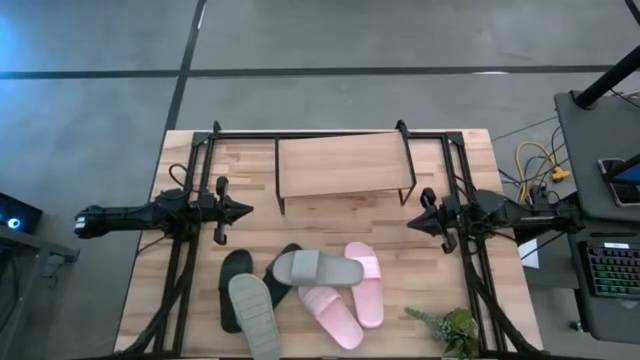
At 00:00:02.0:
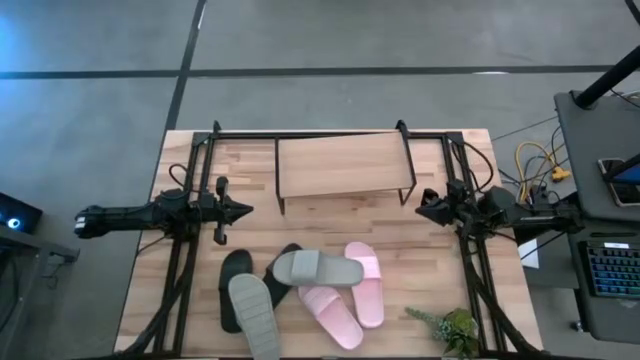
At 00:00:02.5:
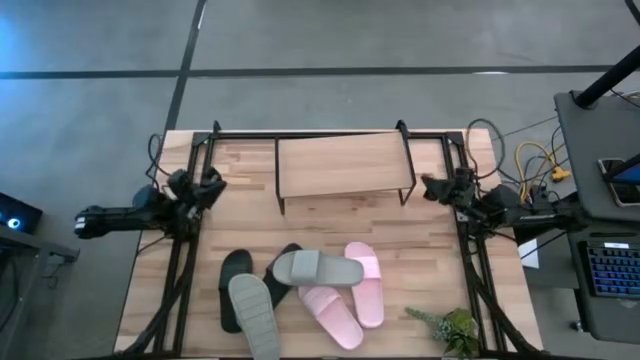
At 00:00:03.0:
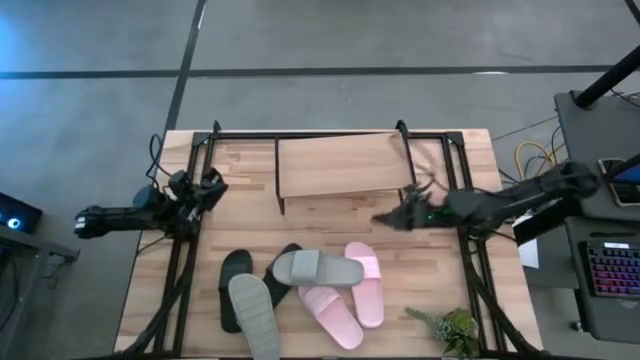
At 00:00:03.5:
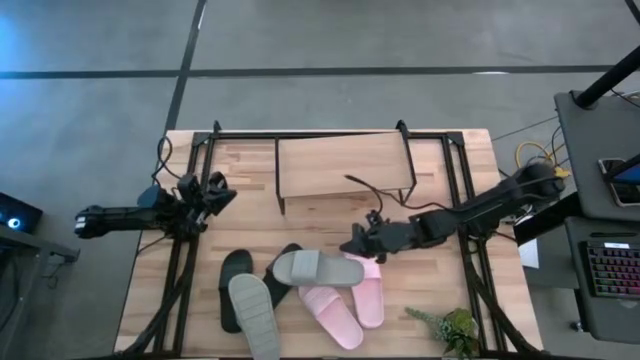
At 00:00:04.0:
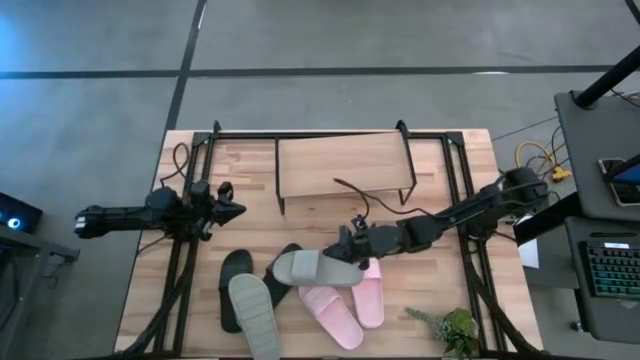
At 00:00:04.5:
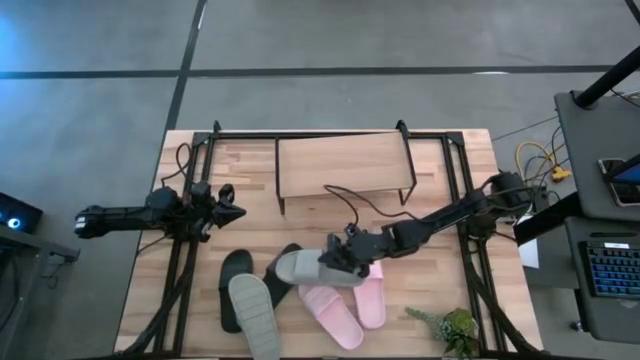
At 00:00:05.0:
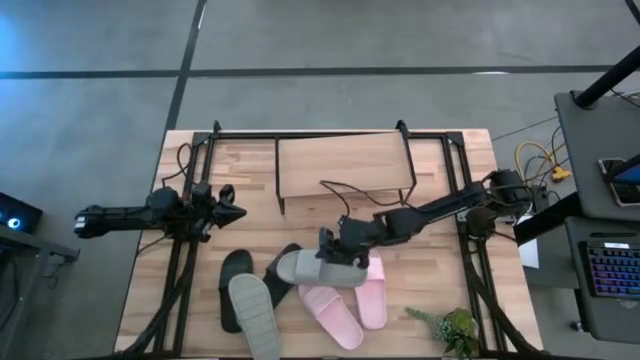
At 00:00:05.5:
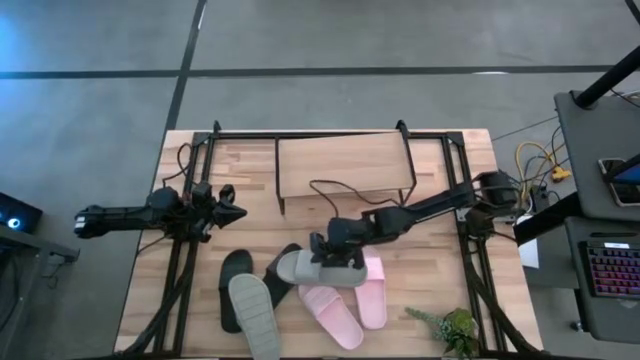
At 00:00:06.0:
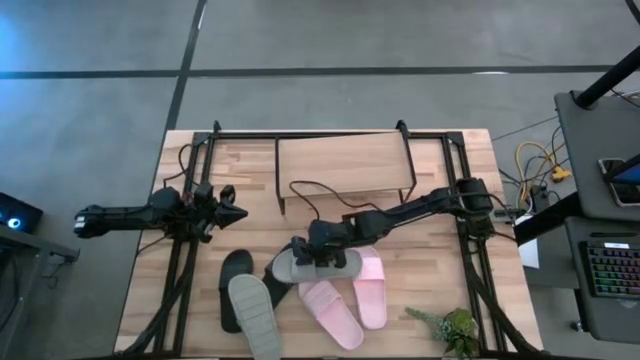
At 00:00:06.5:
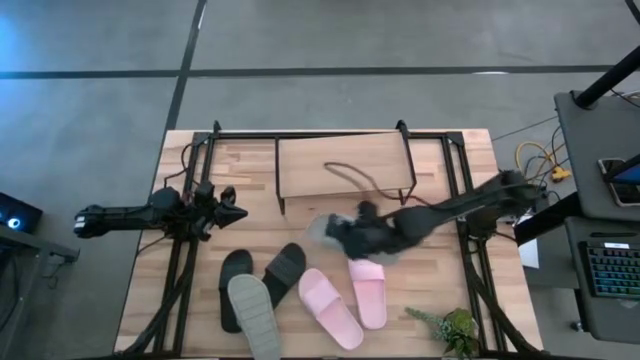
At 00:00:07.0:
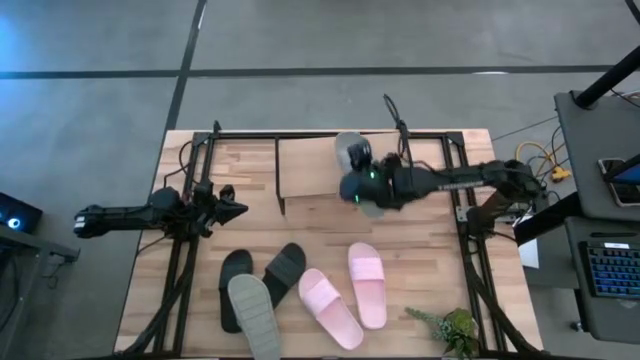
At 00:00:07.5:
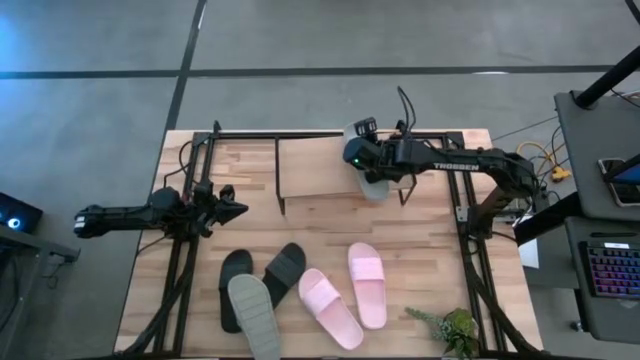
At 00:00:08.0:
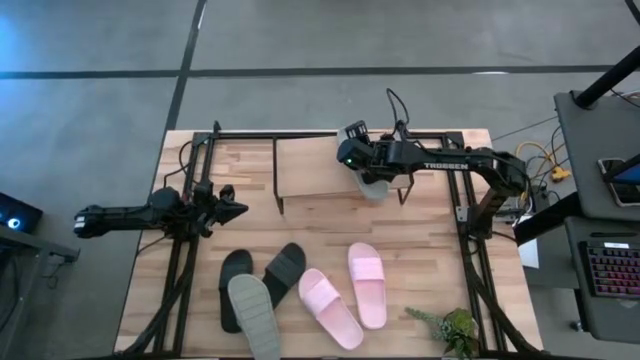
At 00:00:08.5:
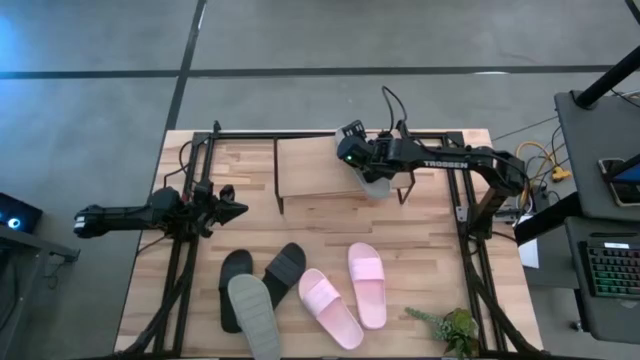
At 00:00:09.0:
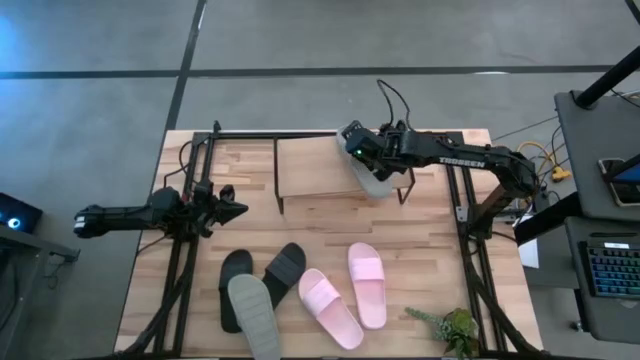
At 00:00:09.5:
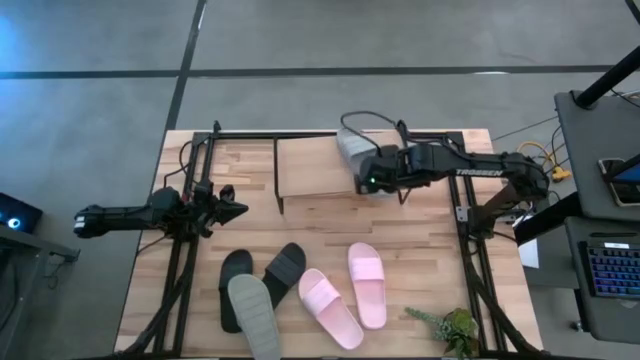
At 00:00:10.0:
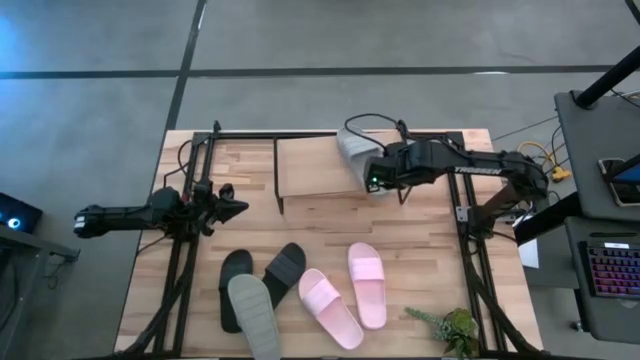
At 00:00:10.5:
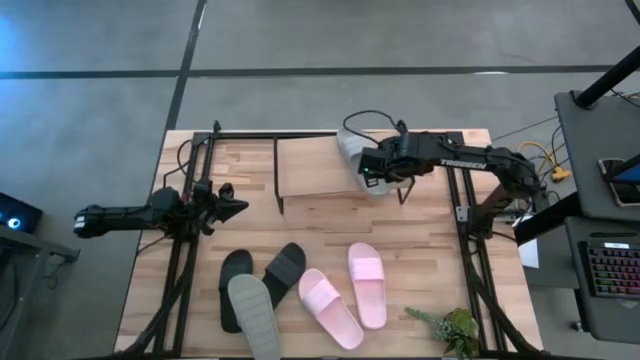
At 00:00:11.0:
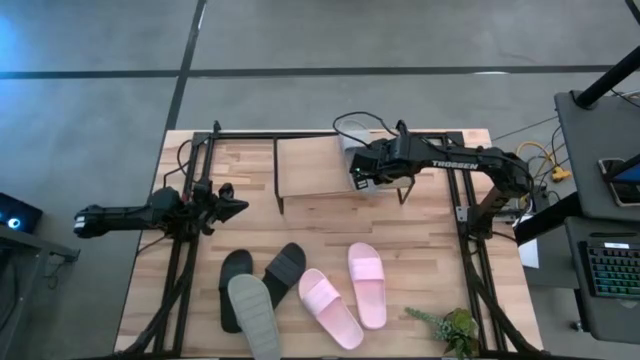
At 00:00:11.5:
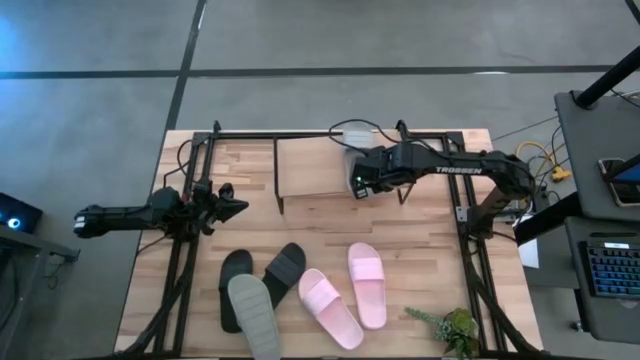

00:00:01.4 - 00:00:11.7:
Task: Pick and place slides into the shelf
Put the right gray slide on the shelf

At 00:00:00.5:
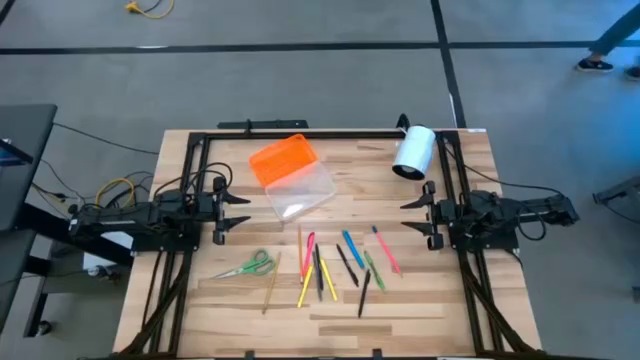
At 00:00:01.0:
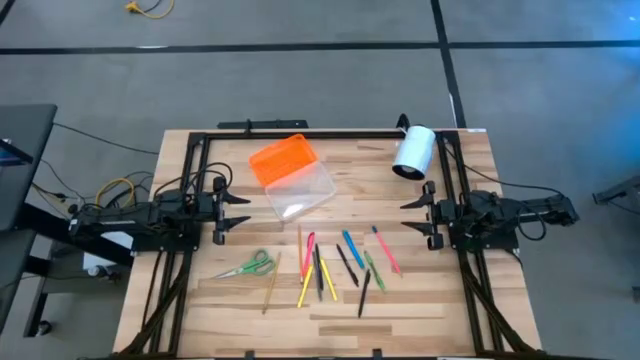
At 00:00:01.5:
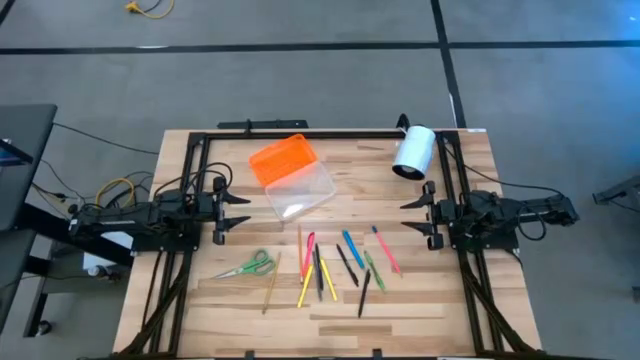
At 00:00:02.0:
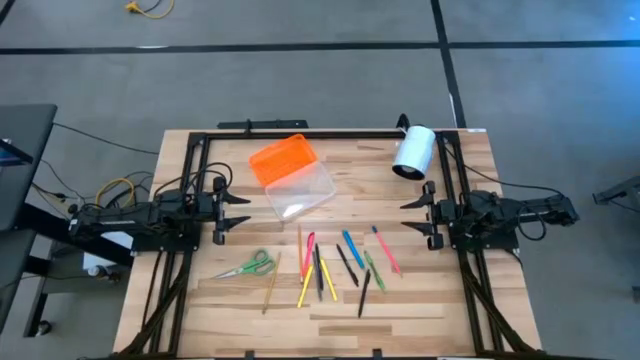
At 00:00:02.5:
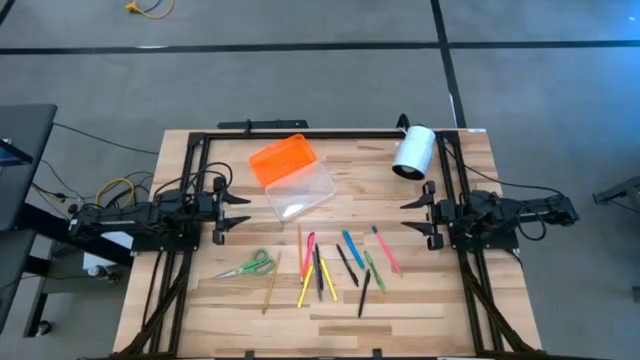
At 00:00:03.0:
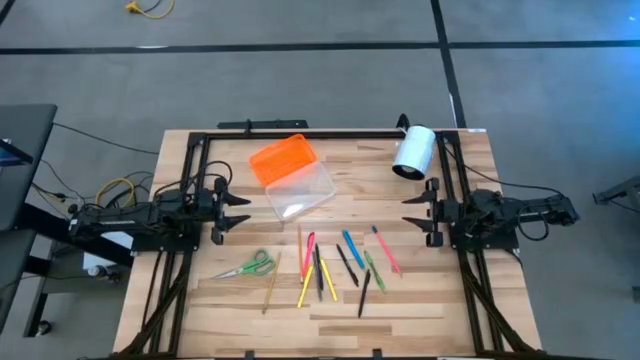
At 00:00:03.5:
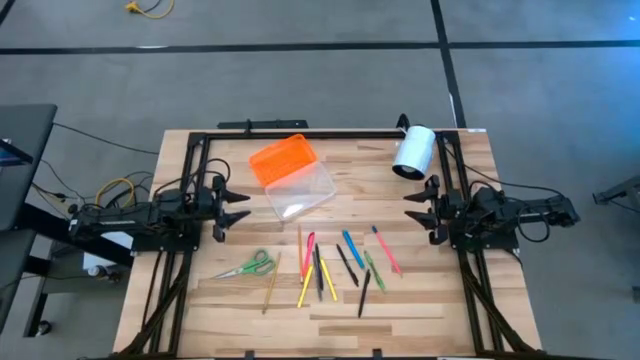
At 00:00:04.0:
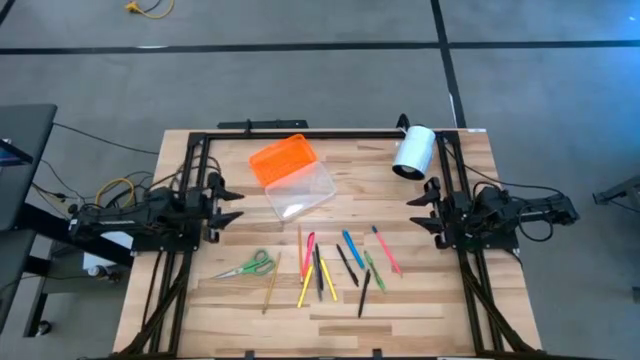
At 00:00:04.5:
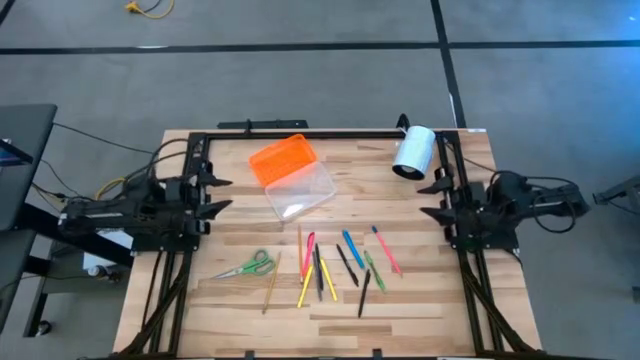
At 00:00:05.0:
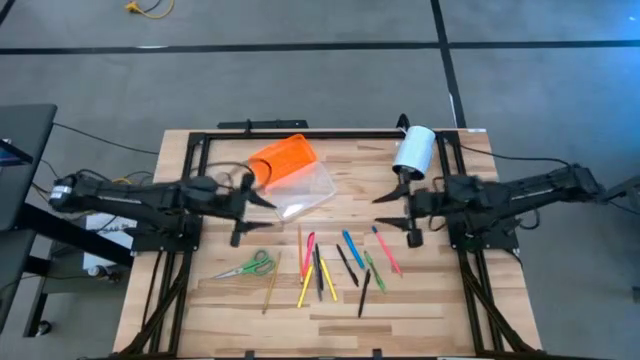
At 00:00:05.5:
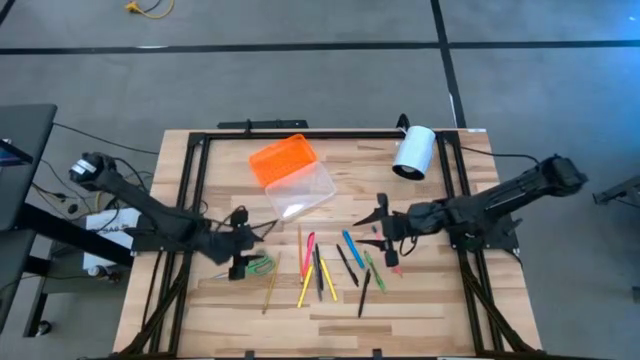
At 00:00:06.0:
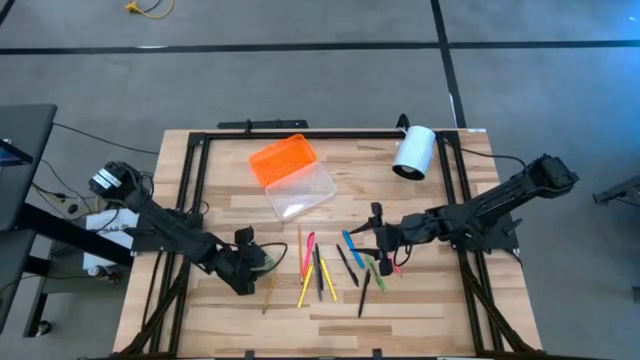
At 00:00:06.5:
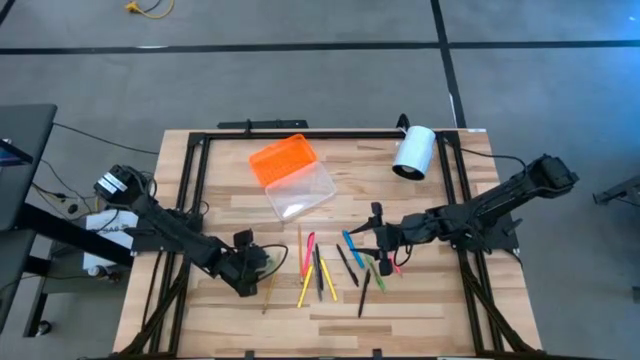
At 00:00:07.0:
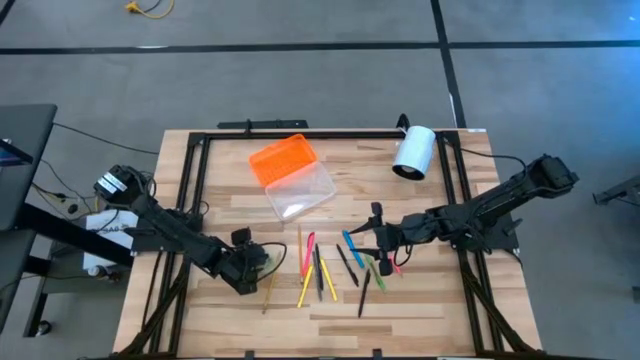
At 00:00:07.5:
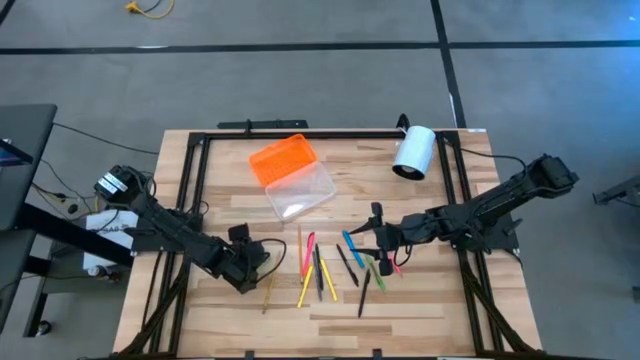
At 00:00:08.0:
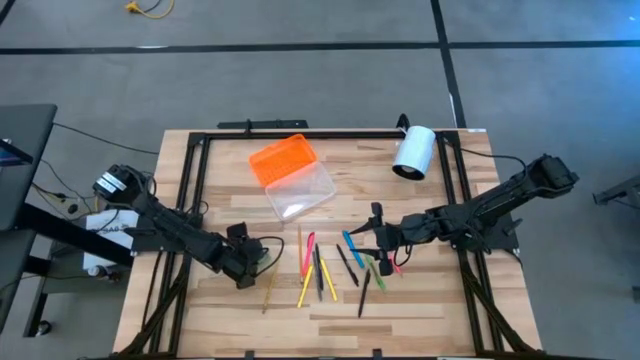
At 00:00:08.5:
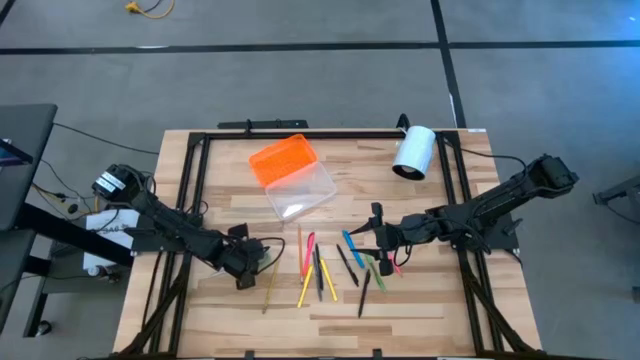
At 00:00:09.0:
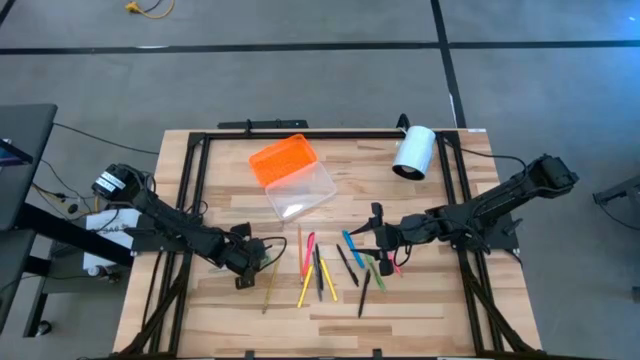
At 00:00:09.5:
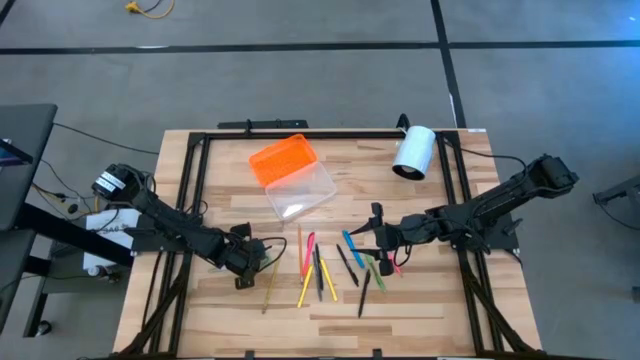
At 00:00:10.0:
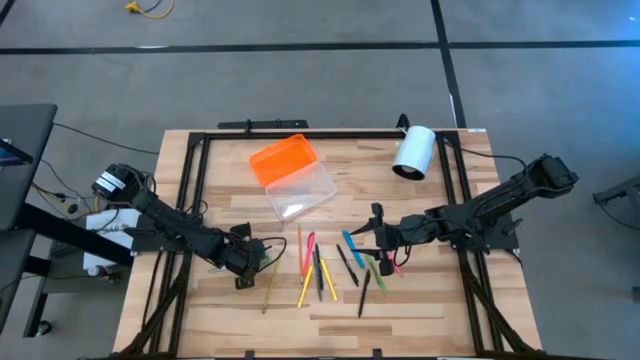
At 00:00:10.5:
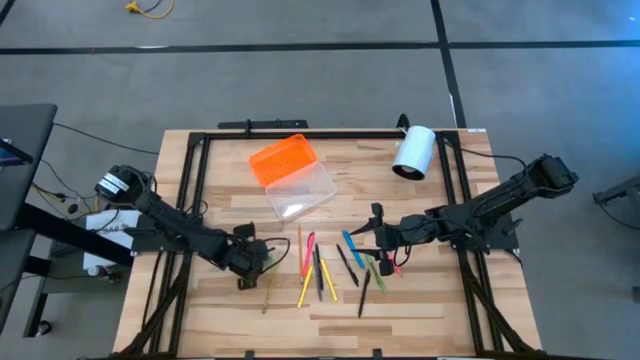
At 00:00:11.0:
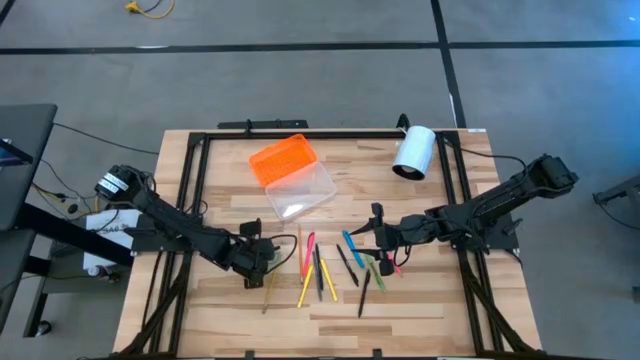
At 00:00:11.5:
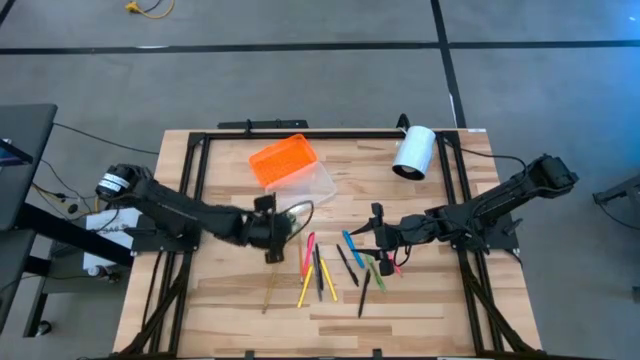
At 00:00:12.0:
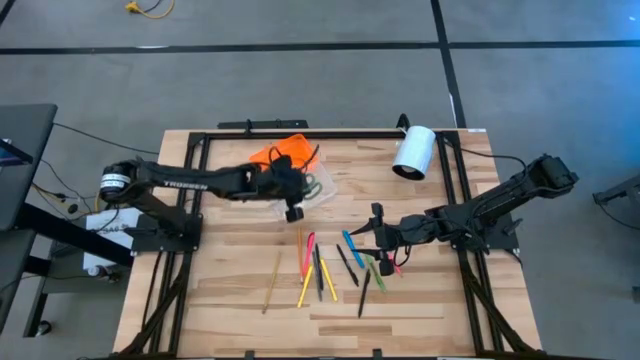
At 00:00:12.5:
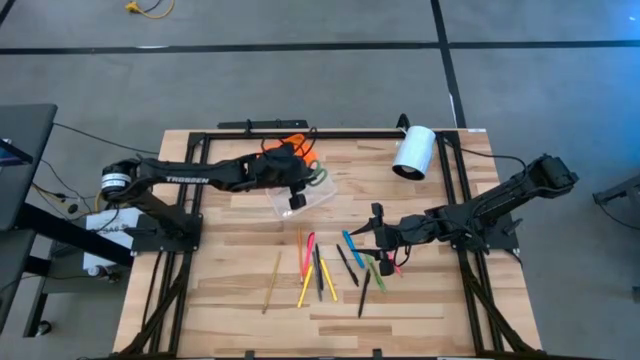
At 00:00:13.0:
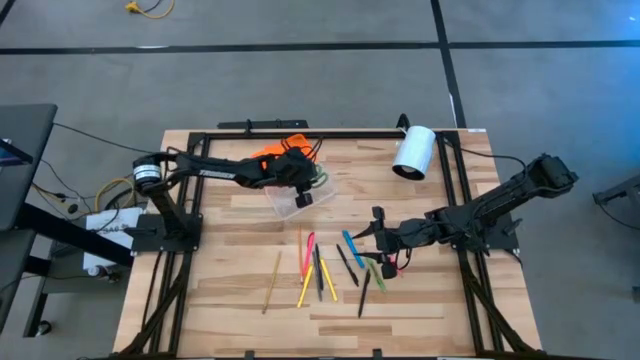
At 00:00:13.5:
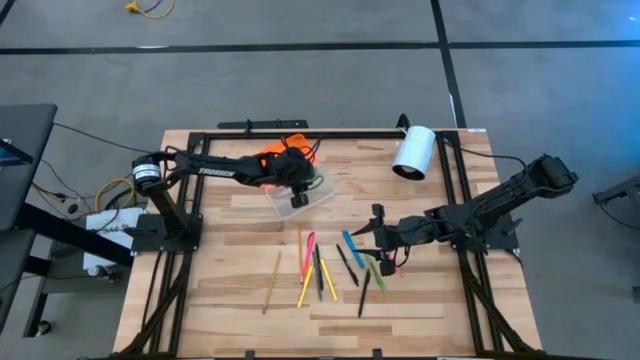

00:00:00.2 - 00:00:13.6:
Task: Pick & place school supplies into a supply box
Put the scissors into the supply box
